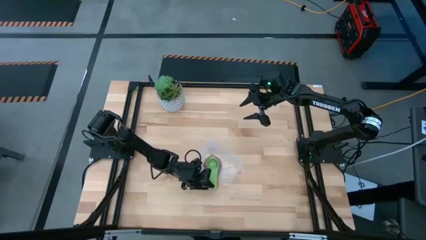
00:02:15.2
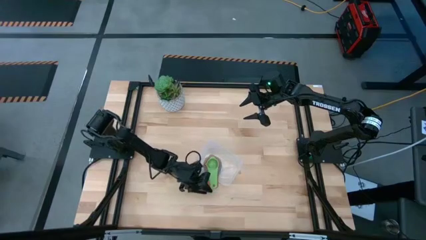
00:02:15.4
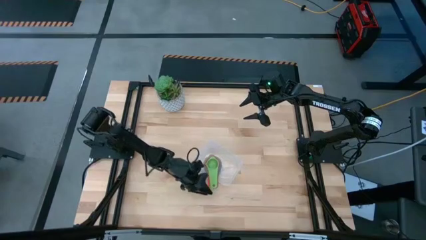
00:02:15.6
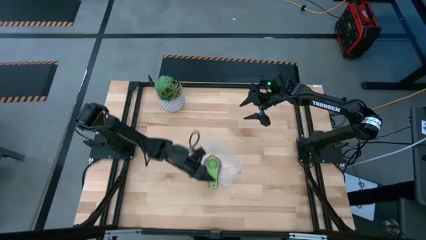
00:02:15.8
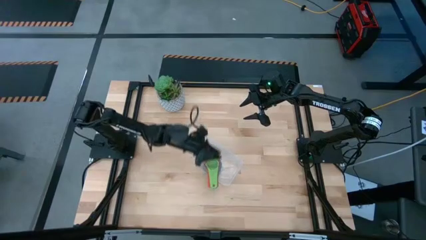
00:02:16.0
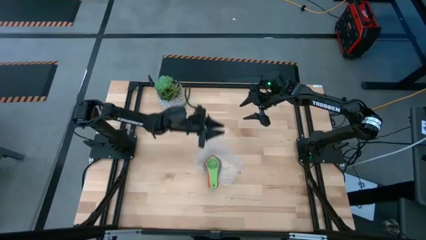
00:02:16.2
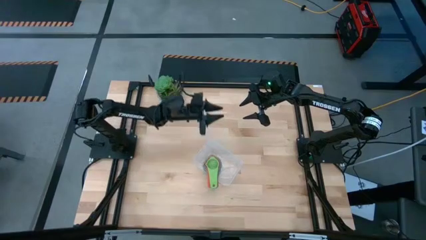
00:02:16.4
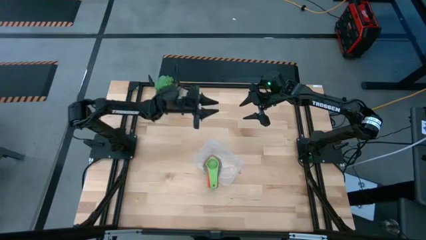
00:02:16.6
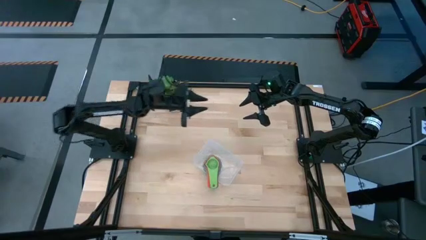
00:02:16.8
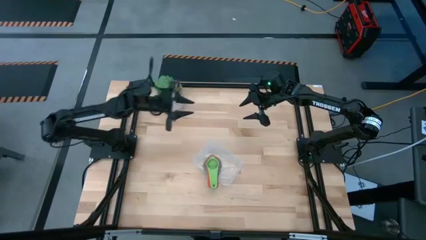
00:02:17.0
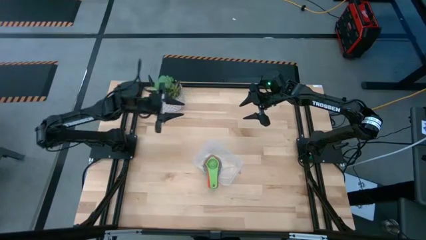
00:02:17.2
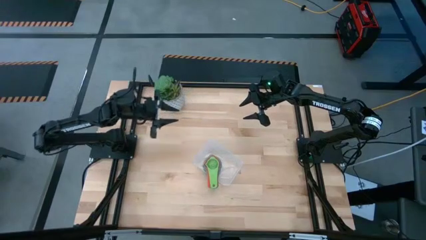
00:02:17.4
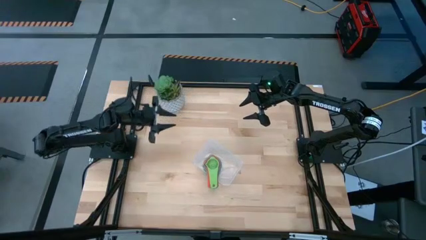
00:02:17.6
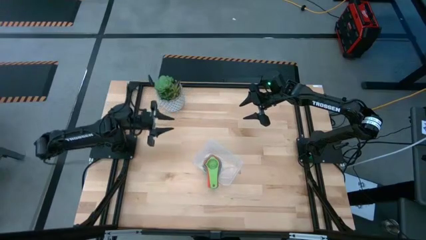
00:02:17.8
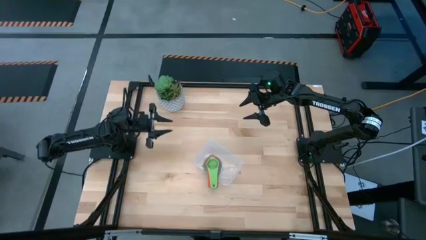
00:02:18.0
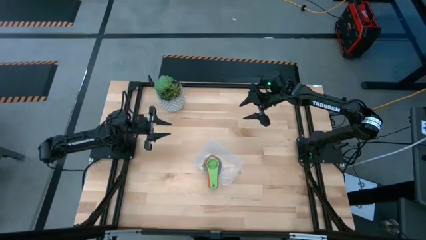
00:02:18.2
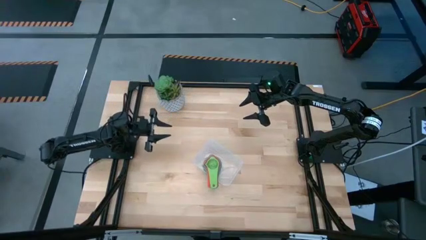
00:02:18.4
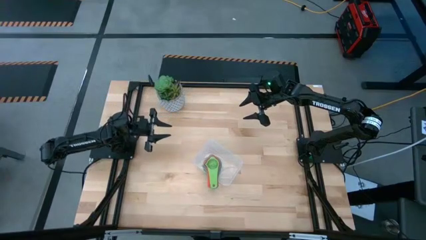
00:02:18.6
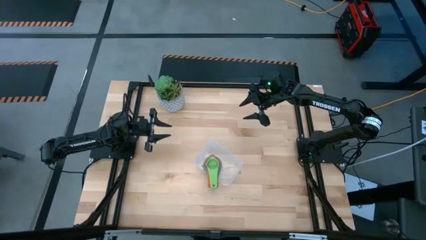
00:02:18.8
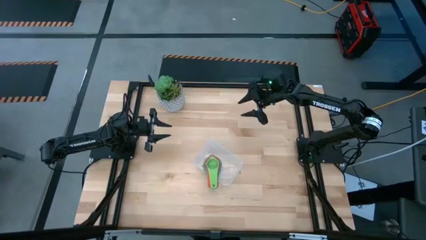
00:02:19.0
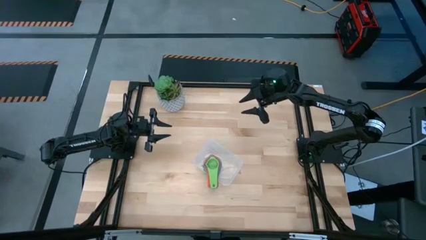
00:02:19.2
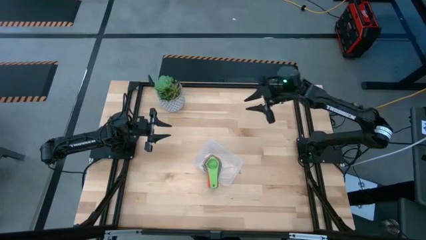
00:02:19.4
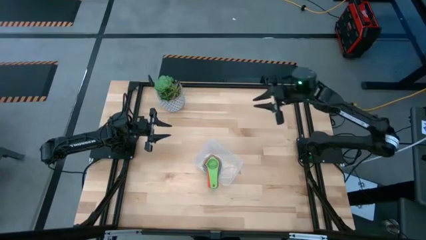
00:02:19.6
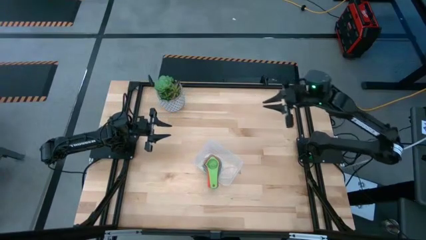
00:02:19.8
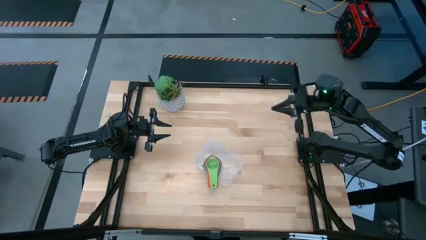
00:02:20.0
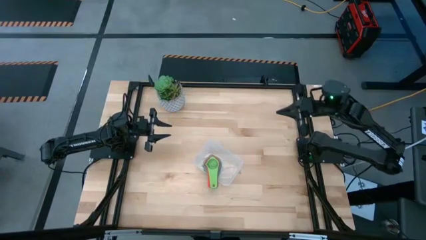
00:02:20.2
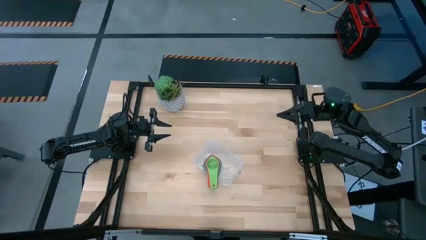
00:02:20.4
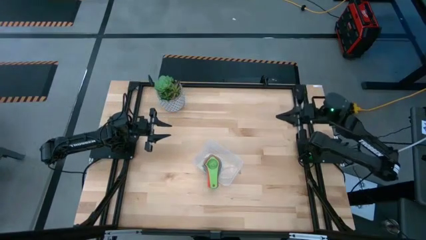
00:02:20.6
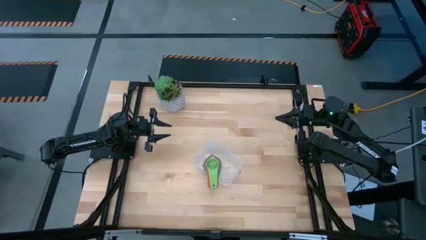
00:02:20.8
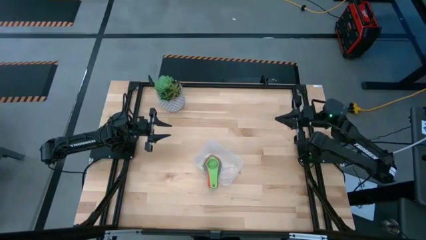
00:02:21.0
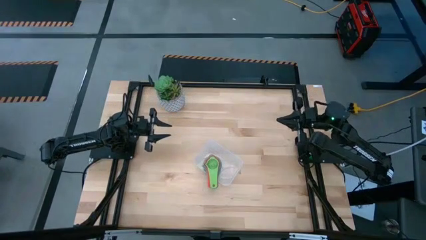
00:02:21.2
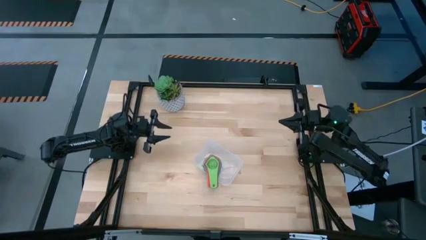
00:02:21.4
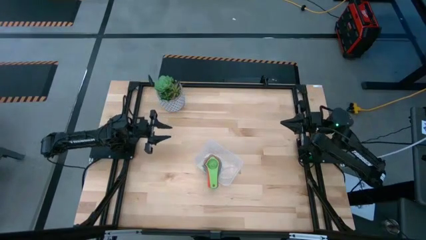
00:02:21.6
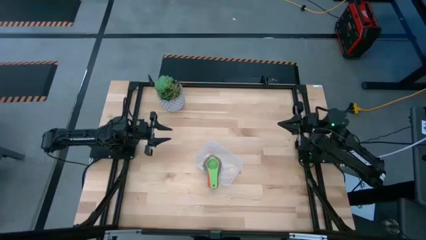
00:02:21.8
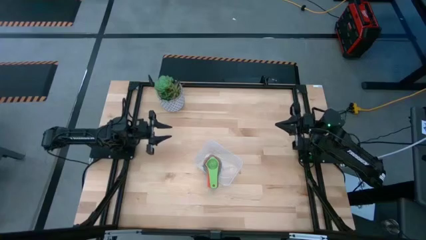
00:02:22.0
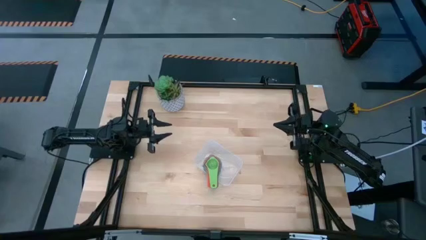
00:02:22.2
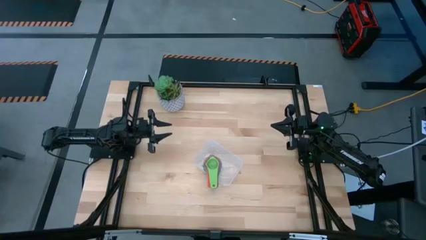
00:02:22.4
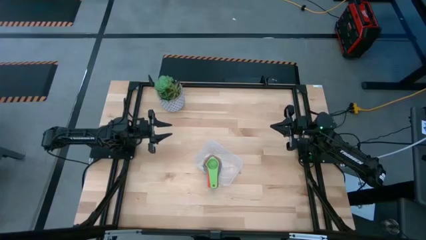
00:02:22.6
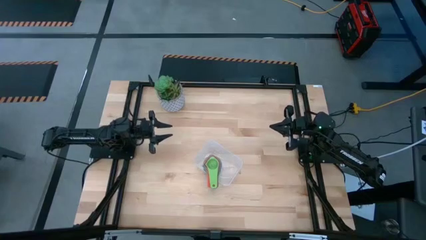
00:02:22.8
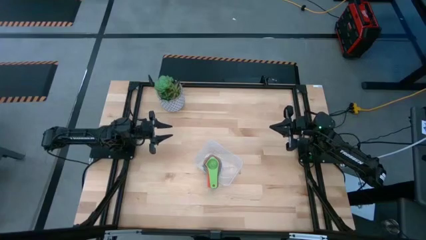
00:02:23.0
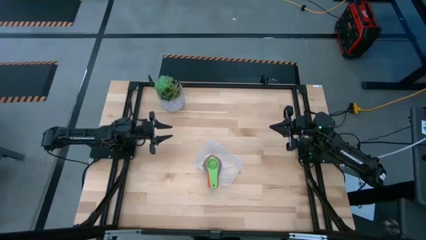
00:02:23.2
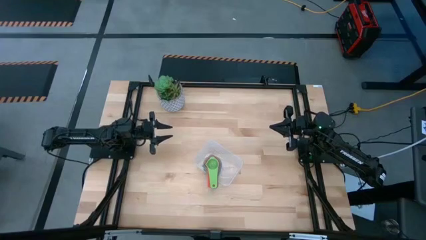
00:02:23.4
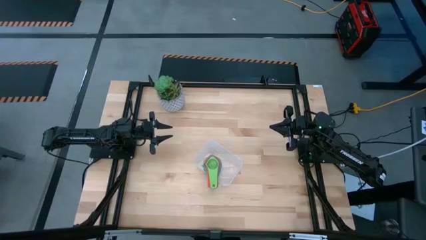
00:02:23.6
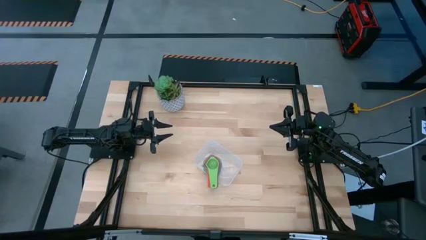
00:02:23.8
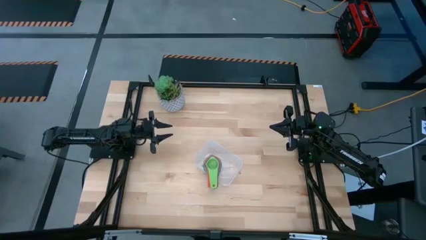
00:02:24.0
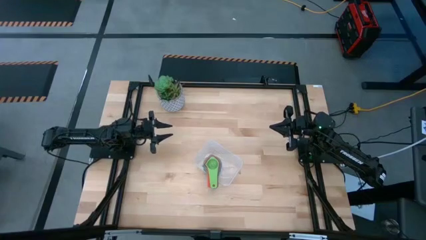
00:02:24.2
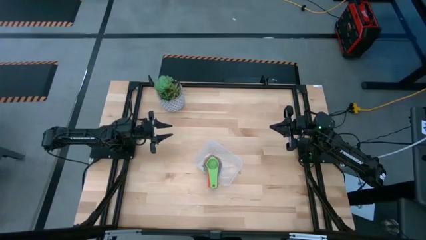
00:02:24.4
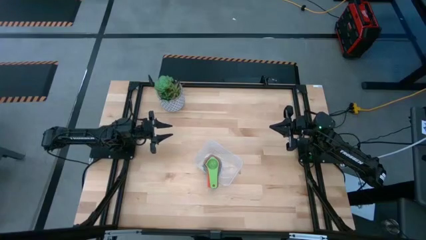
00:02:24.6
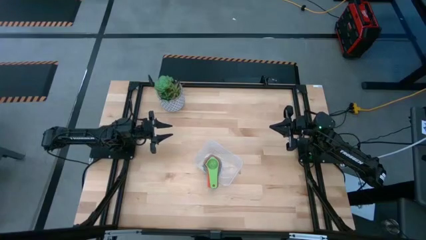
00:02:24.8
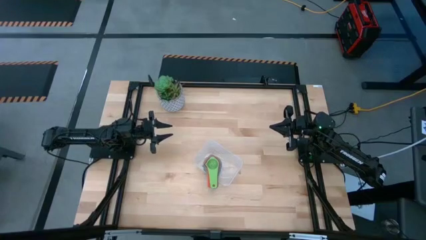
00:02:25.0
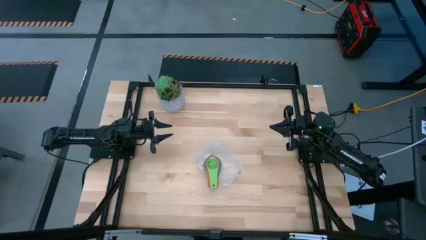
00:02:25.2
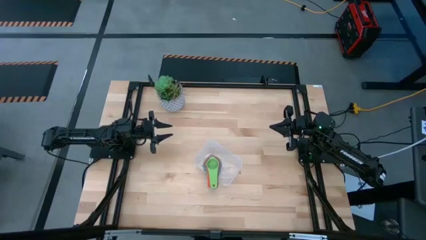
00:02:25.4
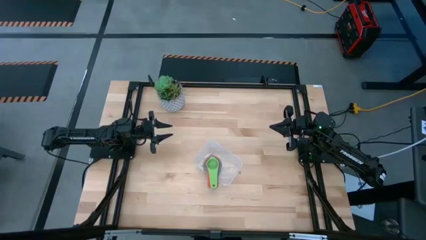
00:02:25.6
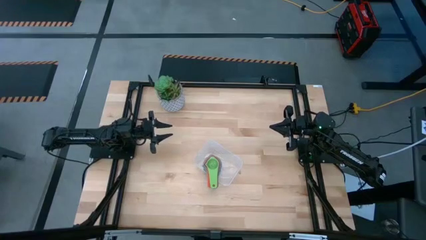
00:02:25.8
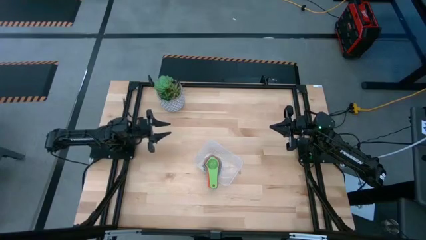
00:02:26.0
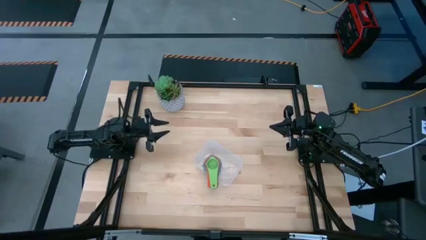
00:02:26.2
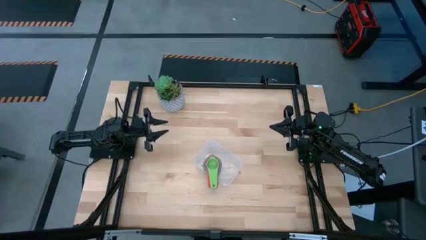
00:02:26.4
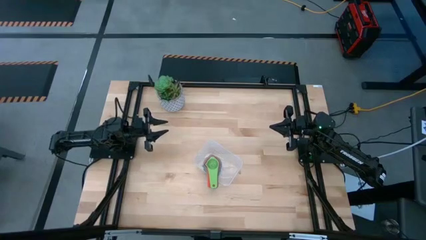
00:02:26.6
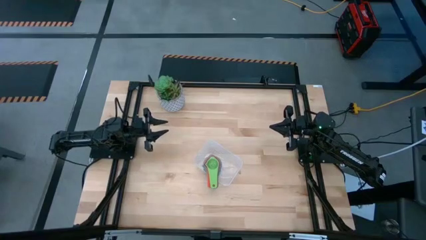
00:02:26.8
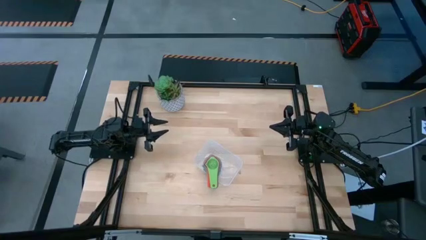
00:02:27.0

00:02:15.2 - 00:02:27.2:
Task: Nest measuring cups in basket
Return to Home Position
